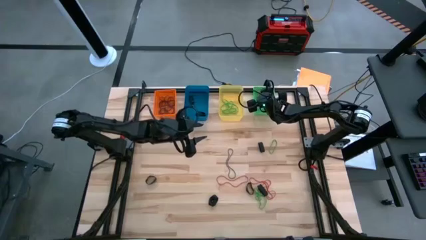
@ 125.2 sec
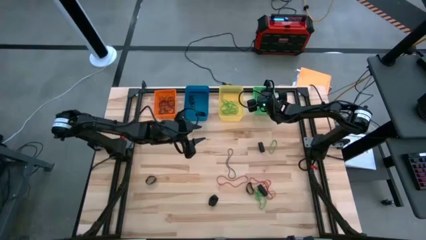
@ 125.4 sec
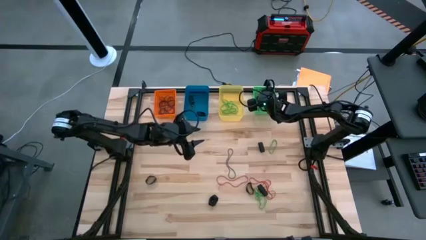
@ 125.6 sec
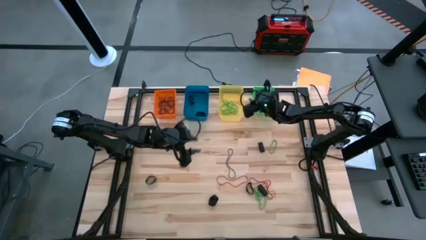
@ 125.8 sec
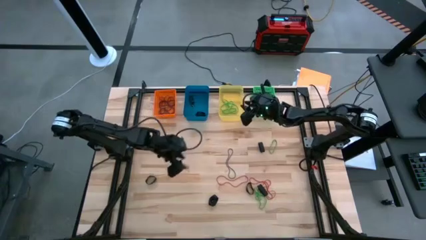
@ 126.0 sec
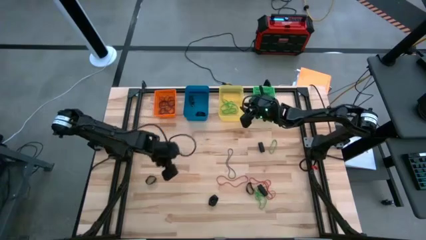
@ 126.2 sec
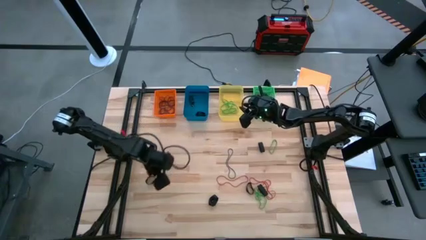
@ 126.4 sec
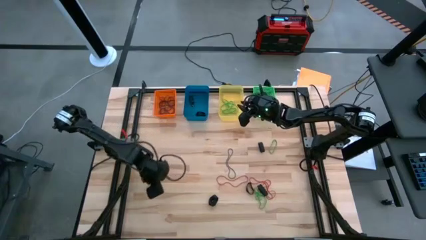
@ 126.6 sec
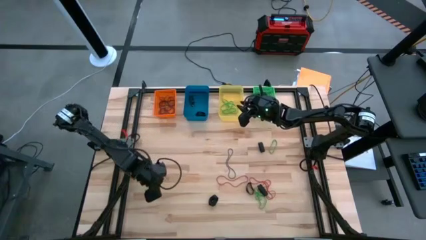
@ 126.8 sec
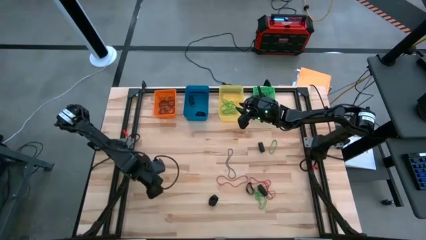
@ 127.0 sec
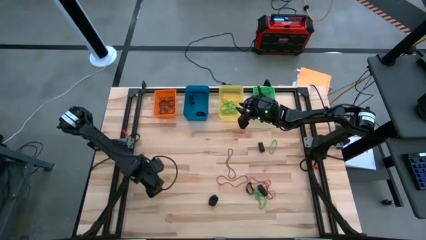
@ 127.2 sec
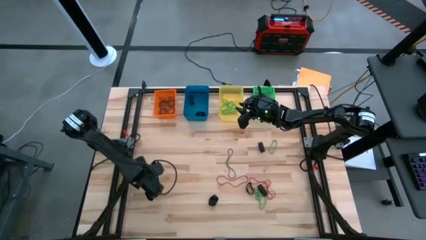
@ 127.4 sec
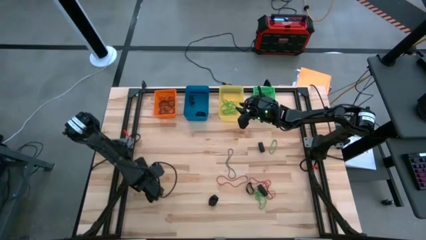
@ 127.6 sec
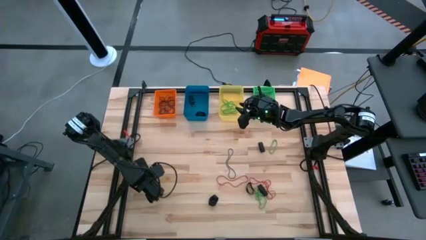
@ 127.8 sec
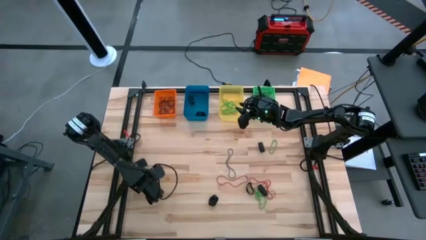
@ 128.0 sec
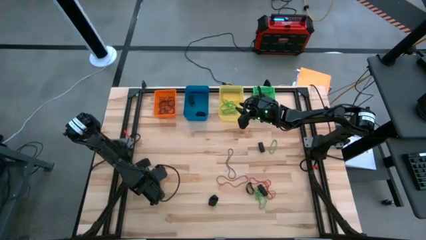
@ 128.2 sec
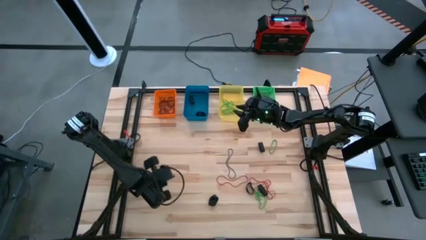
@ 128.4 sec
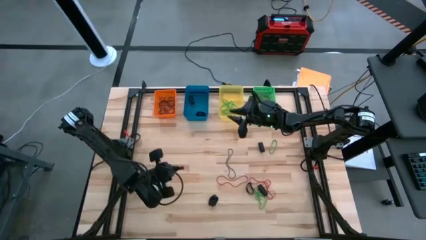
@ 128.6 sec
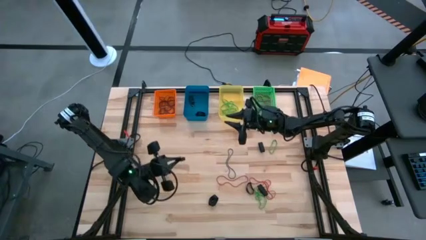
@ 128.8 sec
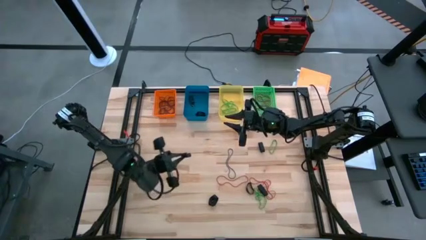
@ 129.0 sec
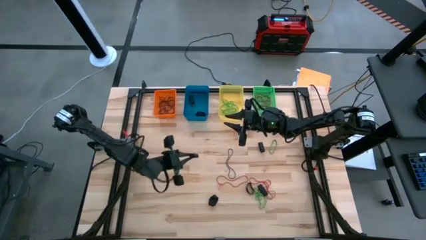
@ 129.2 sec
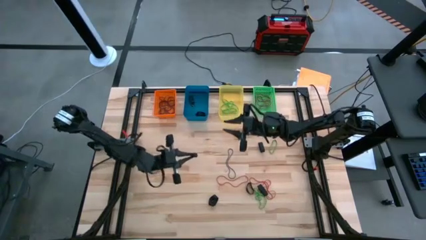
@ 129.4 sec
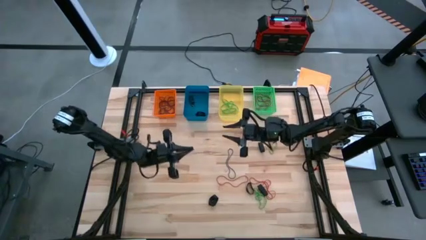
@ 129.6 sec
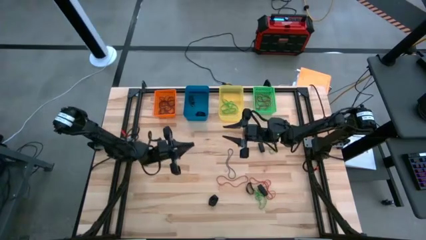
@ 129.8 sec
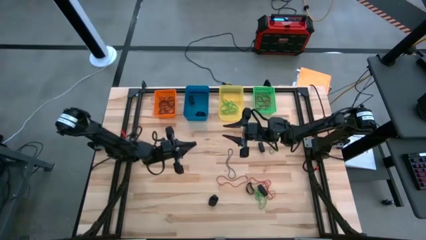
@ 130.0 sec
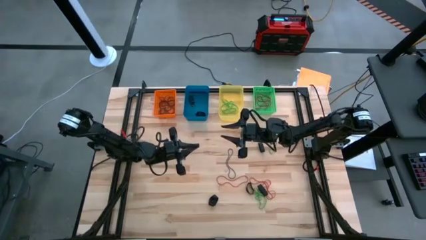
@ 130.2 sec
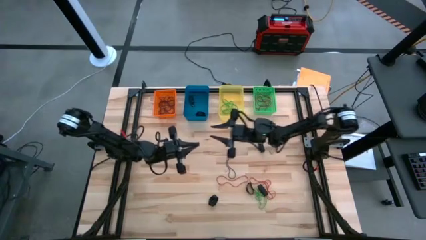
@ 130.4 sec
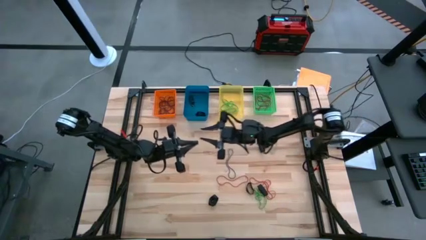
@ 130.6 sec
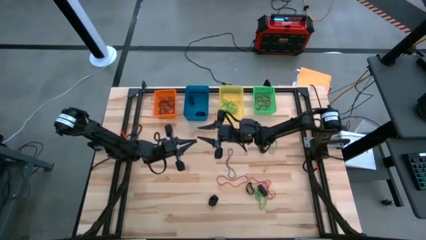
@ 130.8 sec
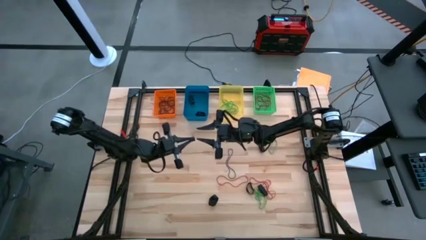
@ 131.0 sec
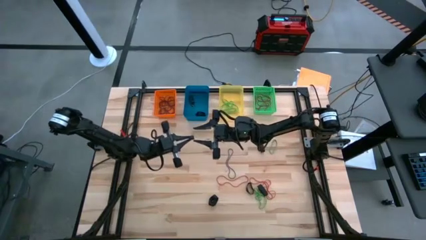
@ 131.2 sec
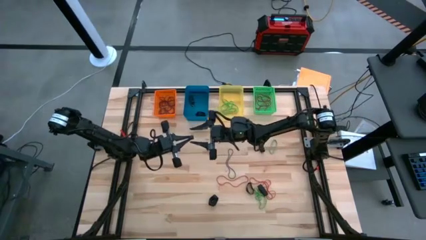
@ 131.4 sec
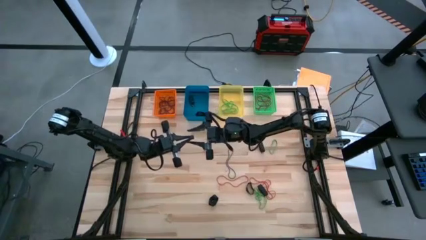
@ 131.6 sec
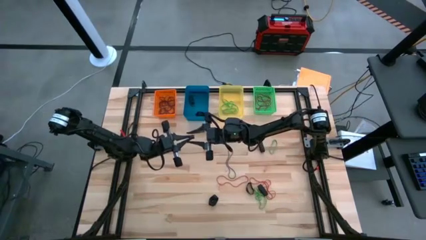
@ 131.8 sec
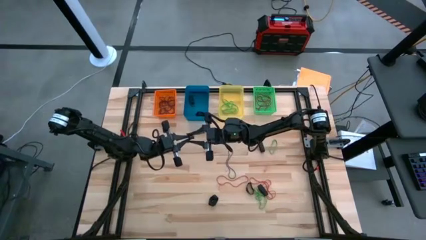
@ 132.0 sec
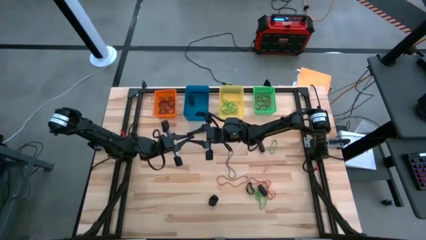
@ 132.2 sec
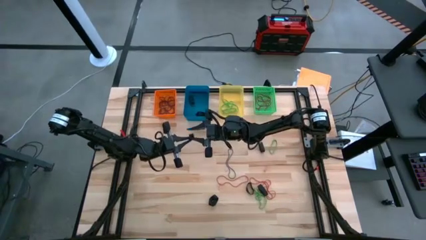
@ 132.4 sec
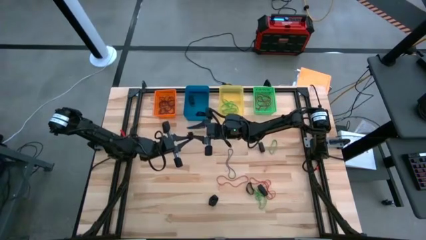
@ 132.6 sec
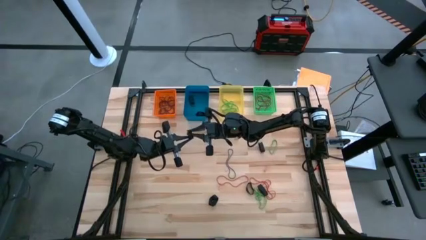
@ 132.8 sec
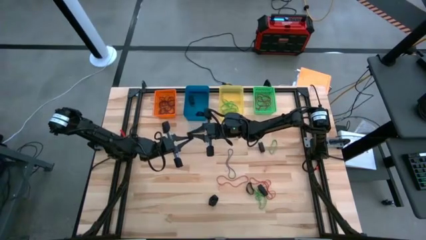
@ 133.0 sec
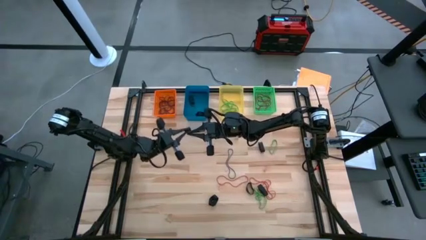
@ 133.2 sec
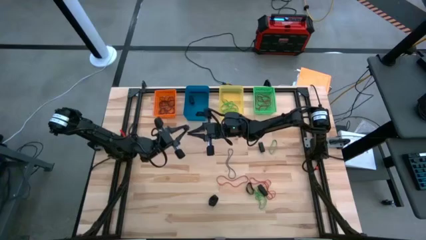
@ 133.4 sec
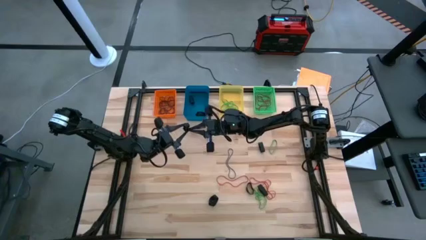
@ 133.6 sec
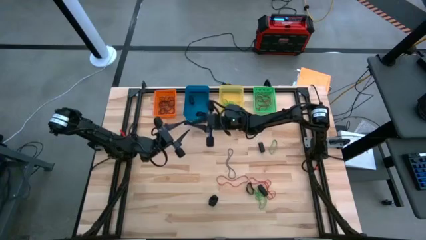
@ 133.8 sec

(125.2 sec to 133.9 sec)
Task: Sort rubber bands into baskets
Put the black rubber band into the blue bin

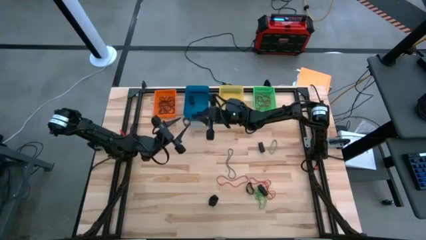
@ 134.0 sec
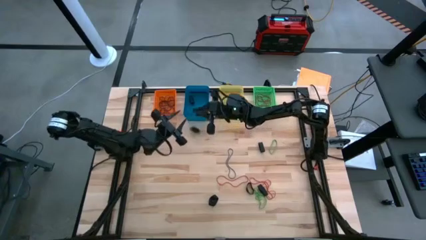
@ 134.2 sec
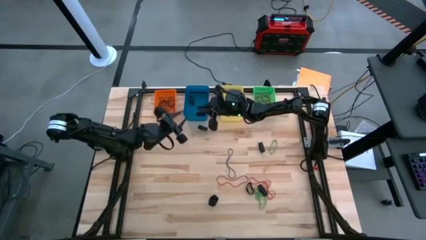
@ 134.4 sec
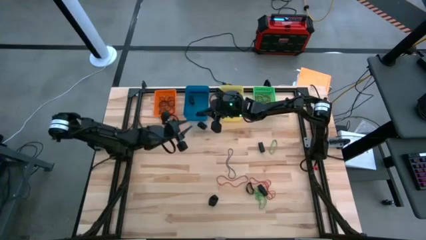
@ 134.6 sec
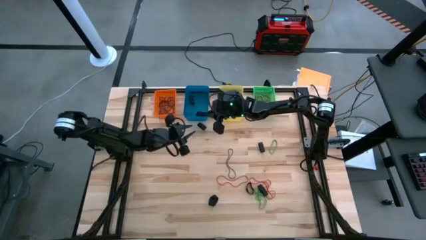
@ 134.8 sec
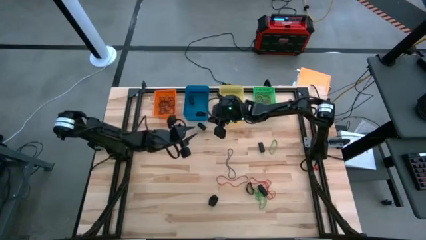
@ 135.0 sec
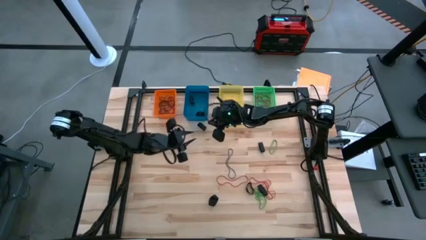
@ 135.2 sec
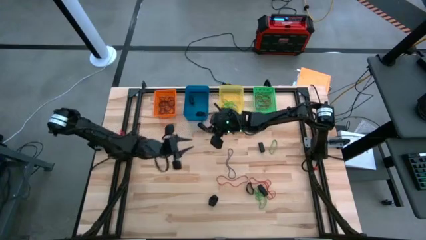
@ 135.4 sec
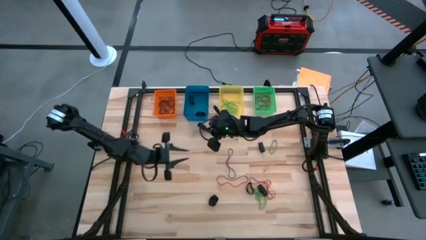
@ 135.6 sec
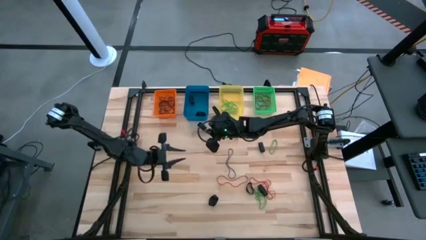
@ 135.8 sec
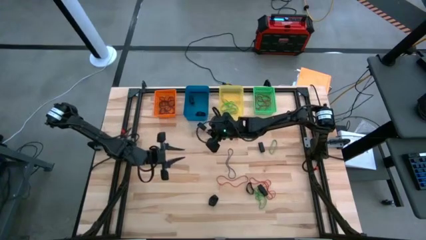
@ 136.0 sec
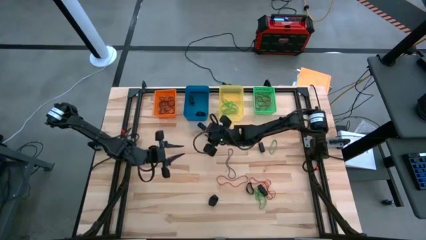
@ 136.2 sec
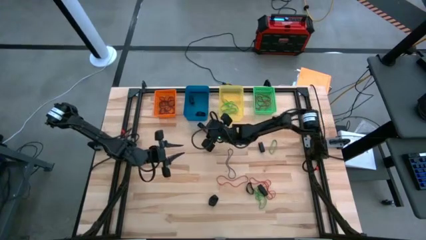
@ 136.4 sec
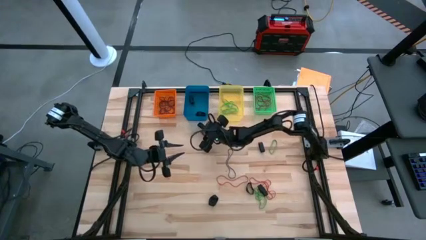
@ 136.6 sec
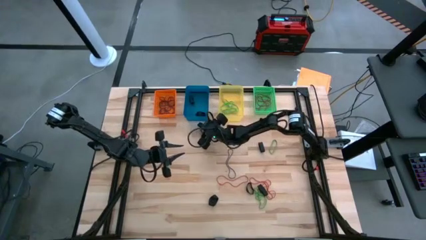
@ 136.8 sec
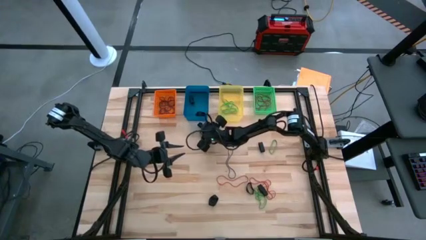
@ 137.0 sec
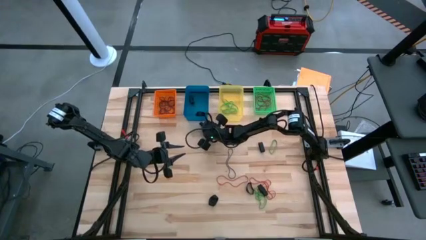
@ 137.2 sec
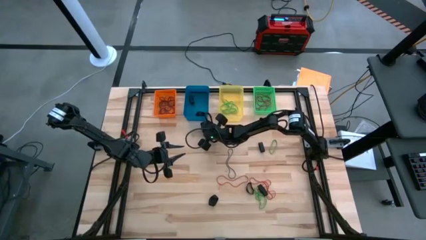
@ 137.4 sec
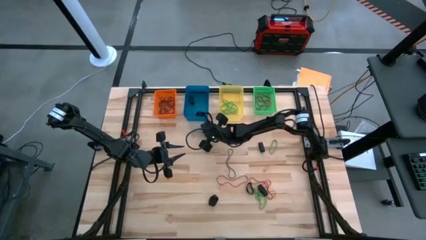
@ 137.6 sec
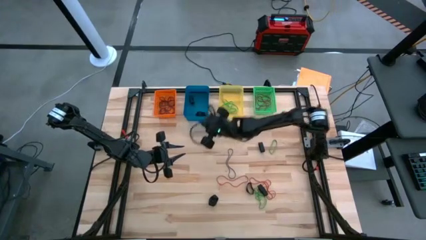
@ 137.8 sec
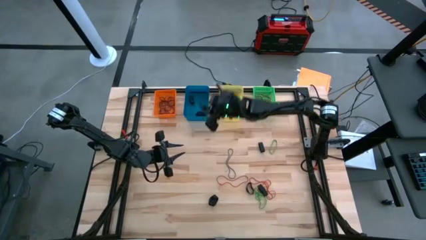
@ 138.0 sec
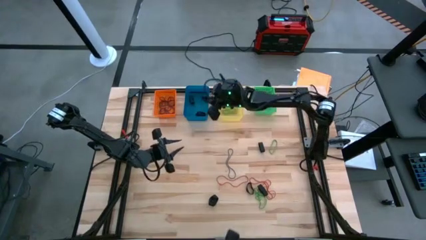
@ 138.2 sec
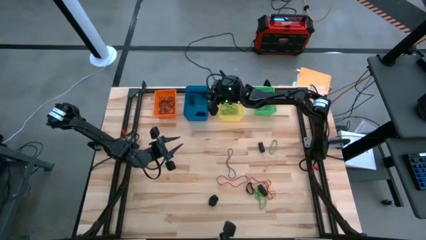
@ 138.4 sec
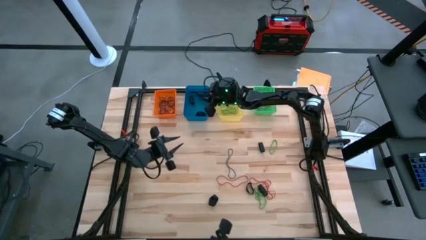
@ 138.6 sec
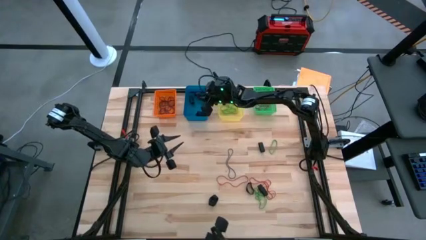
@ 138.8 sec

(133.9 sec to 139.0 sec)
Put the black rubber band into the blue bin
